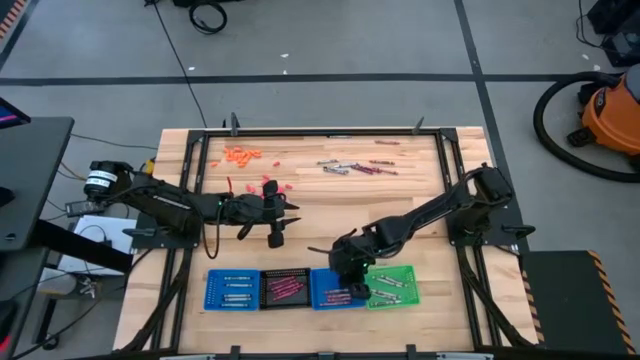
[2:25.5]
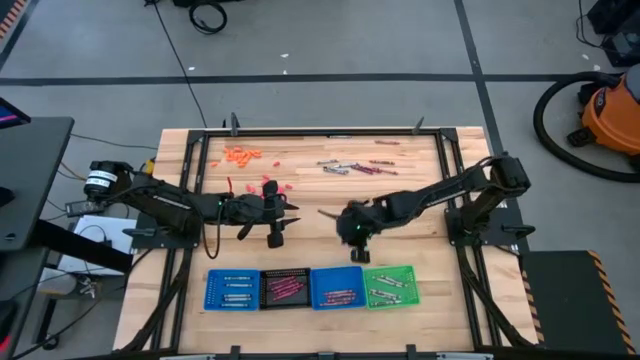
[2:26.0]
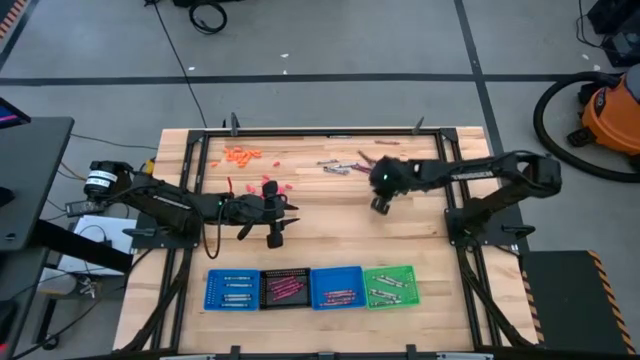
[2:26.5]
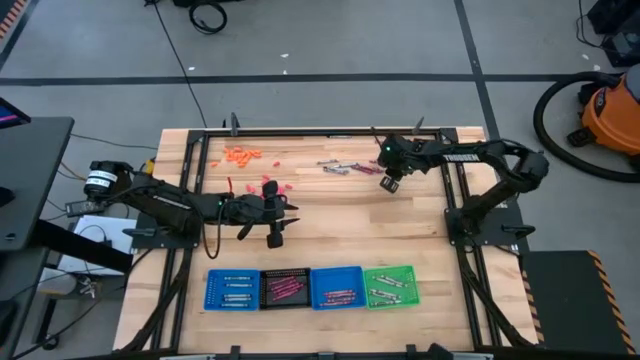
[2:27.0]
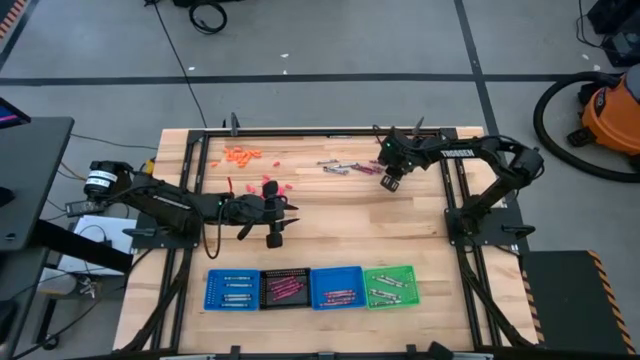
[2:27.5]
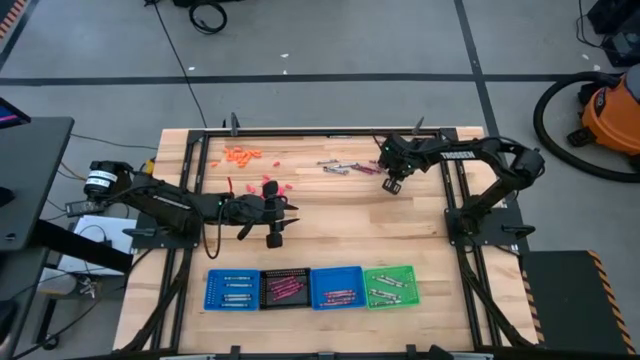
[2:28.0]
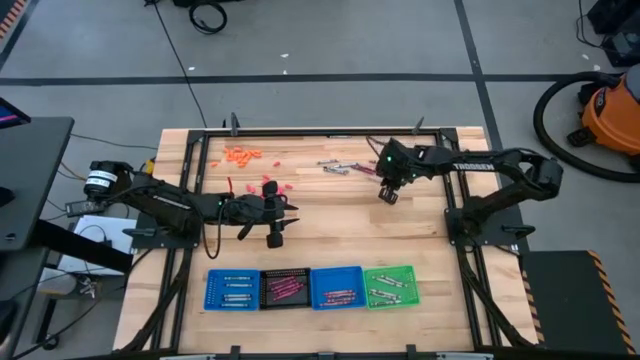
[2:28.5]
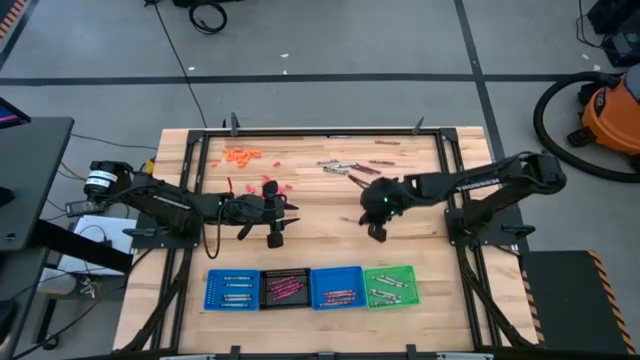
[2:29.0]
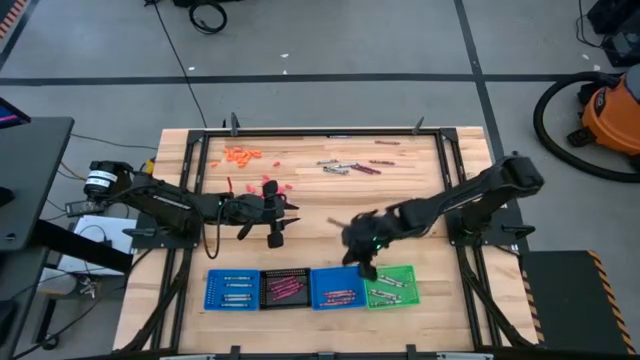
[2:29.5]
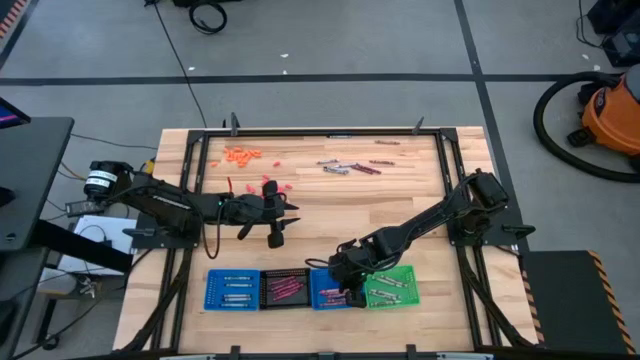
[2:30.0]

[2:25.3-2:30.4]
Task: Sort crayons
Put the pink crayon into the right blue bin

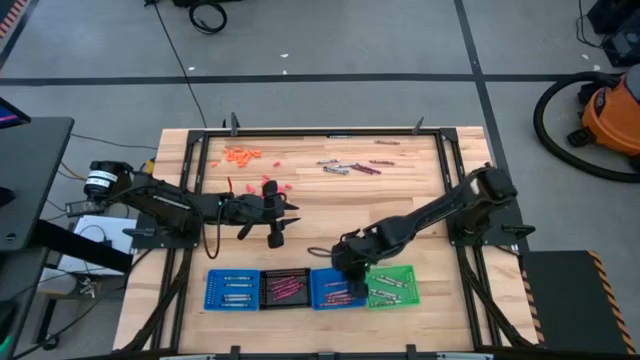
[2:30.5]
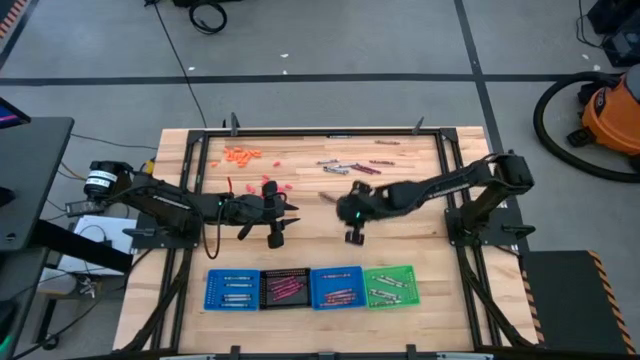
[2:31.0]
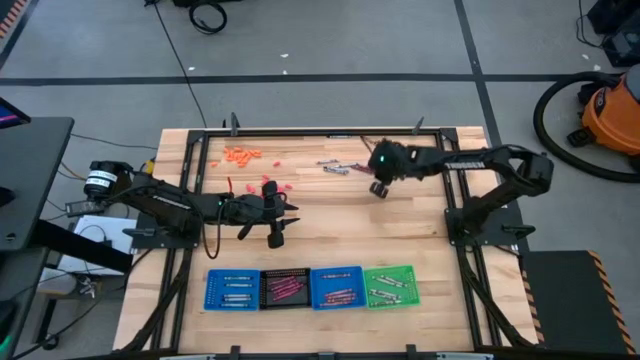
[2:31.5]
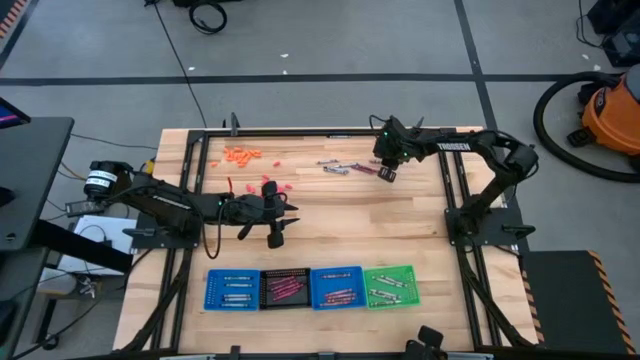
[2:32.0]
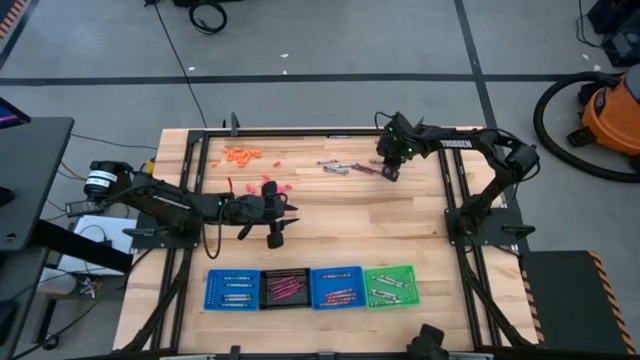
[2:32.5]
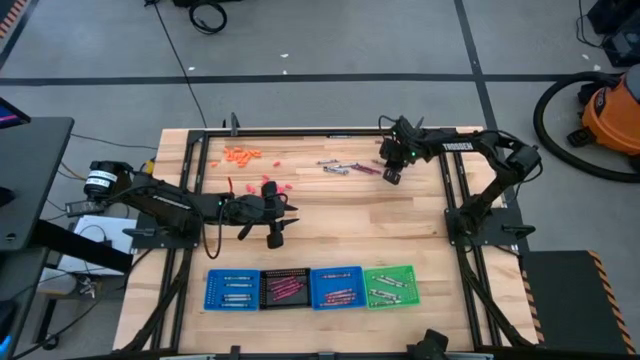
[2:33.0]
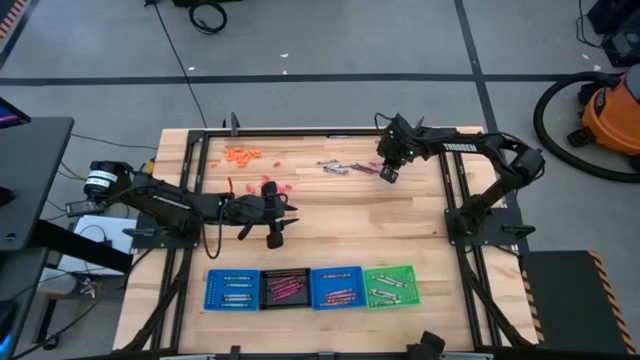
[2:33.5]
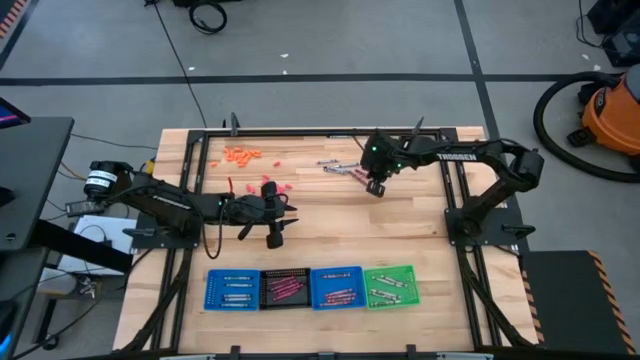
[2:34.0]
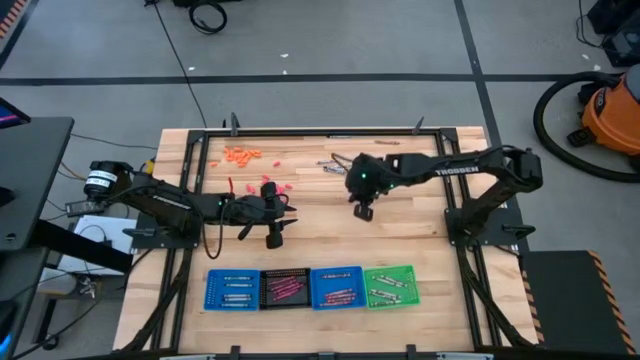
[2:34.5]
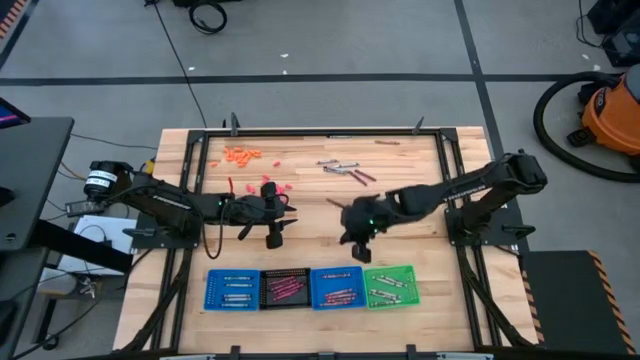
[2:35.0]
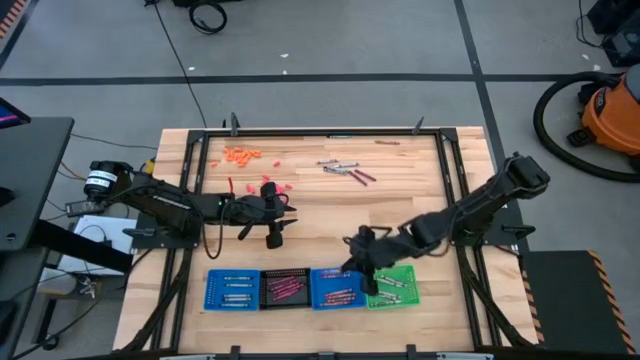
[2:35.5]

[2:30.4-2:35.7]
Put the pink crayon into the right blue bin

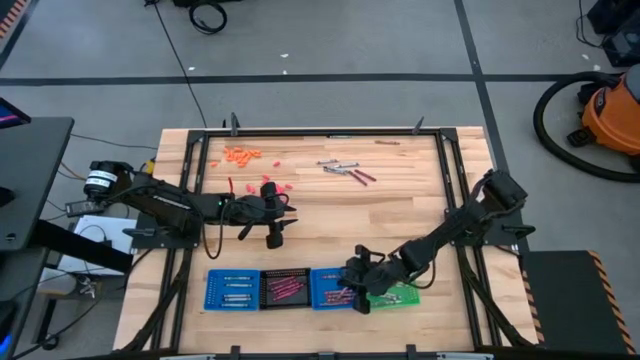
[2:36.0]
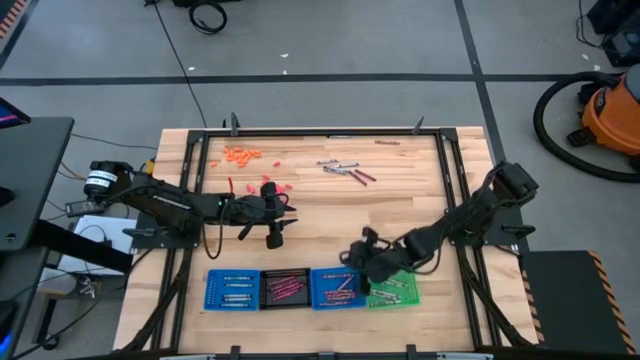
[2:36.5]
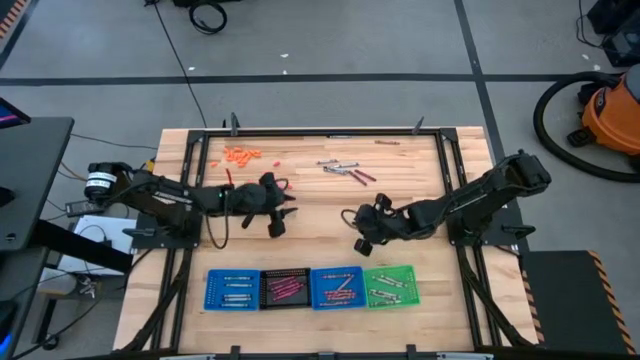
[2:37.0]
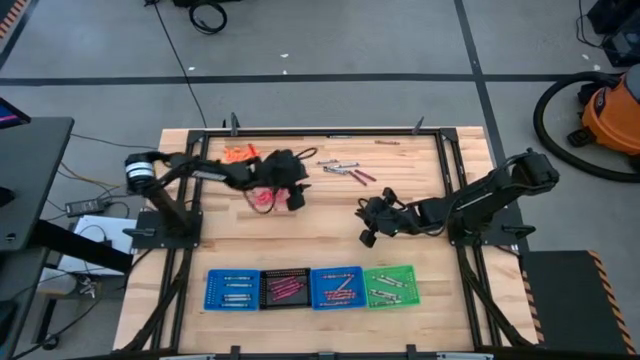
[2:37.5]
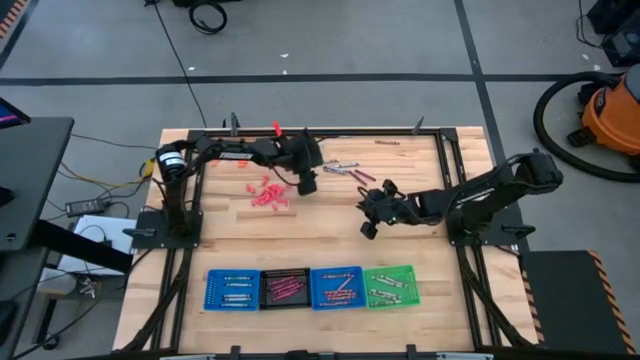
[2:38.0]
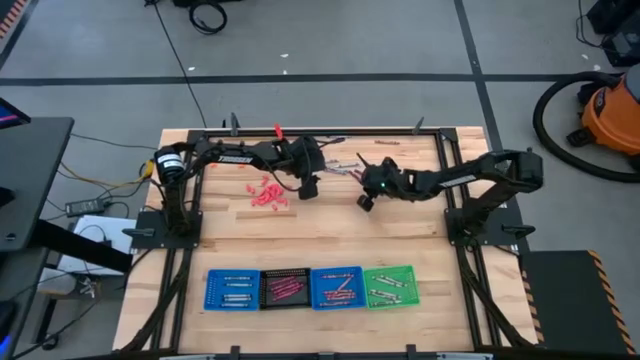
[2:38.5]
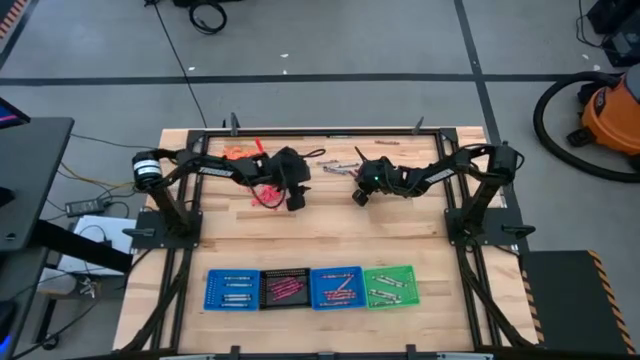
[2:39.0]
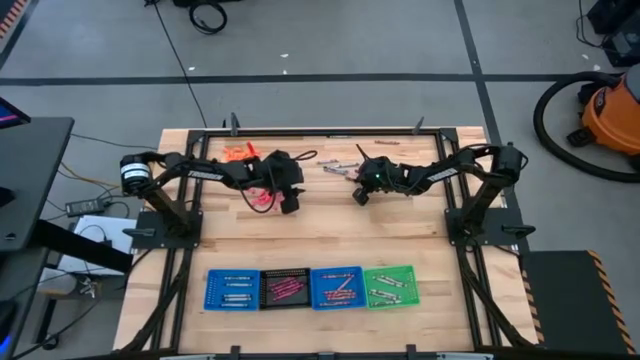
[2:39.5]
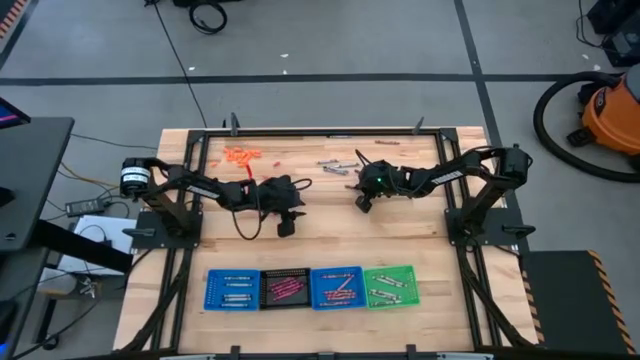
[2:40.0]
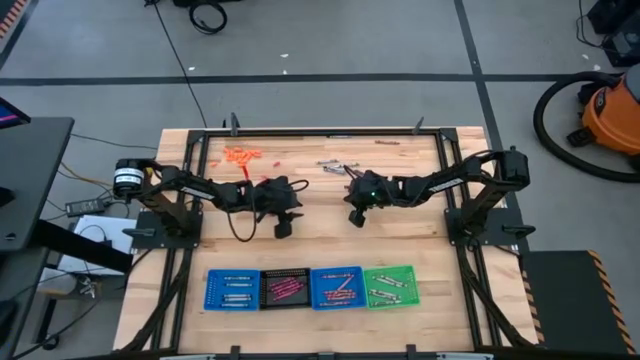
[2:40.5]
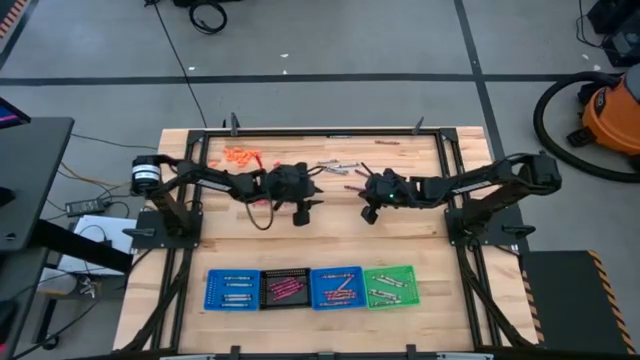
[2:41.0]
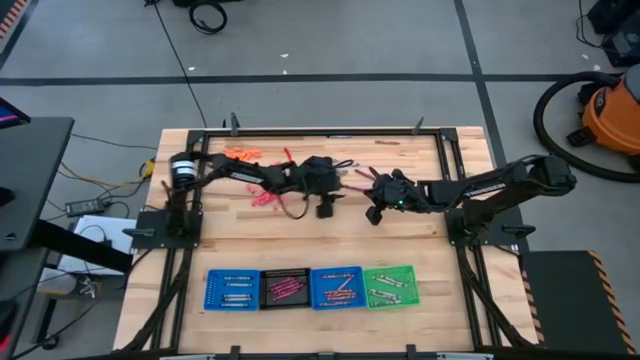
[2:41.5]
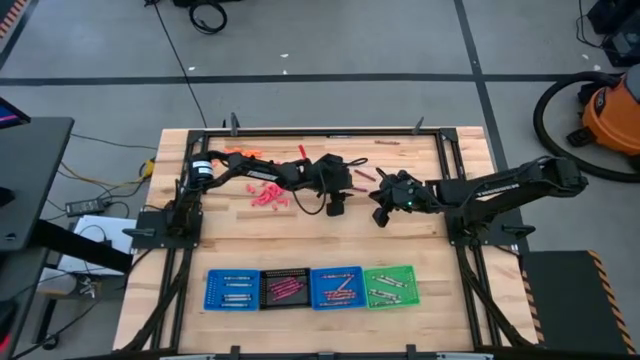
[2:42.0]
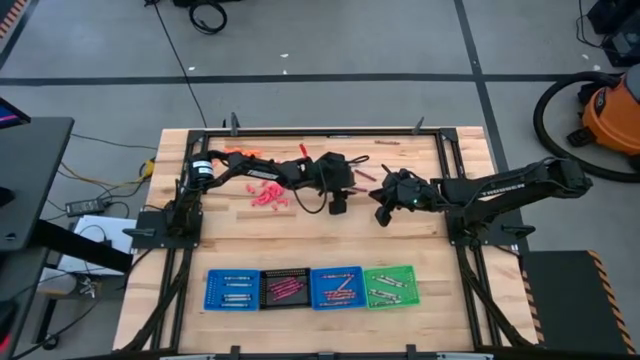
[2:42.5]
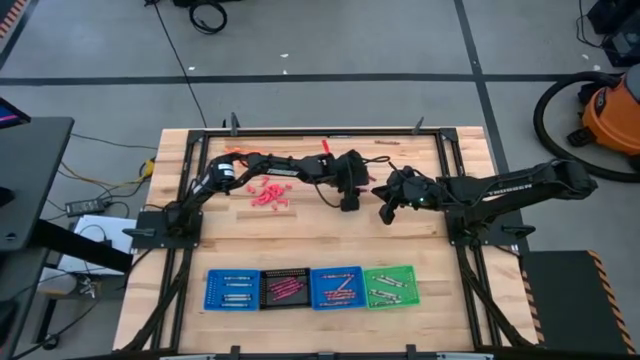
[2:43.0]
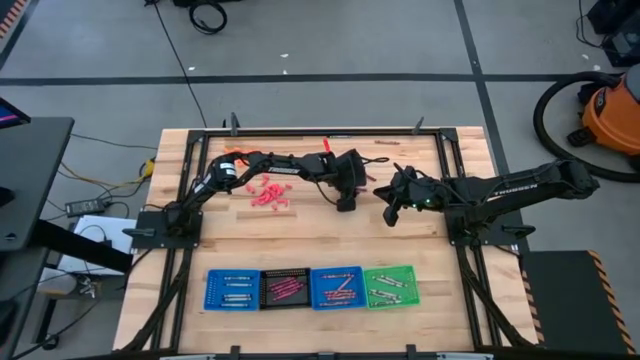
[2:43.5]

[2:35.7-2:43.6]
Put the dark pink crayon into the black bin

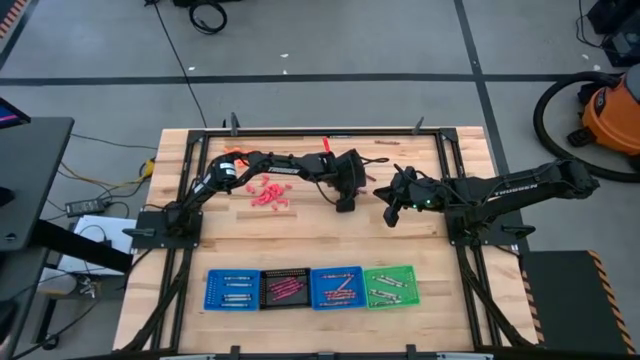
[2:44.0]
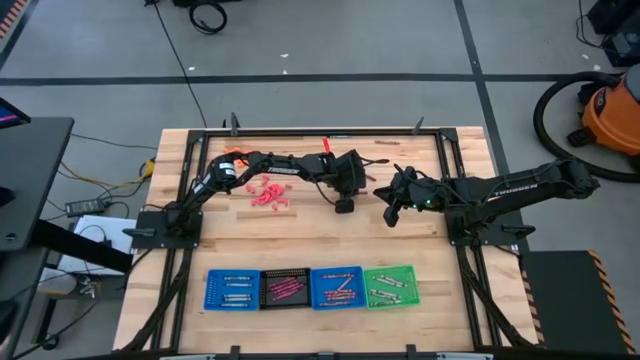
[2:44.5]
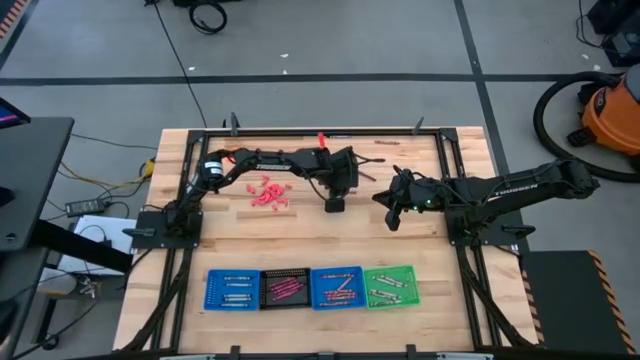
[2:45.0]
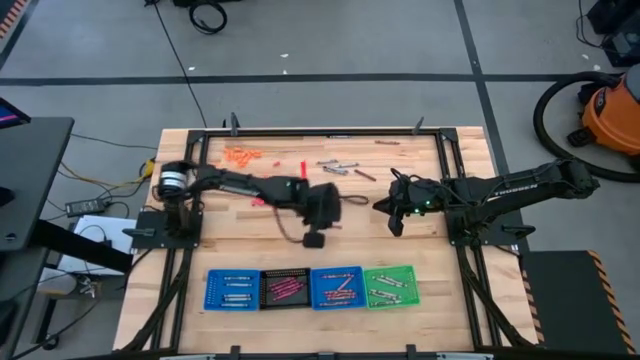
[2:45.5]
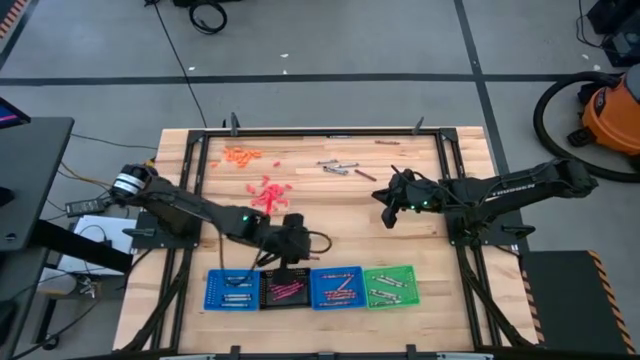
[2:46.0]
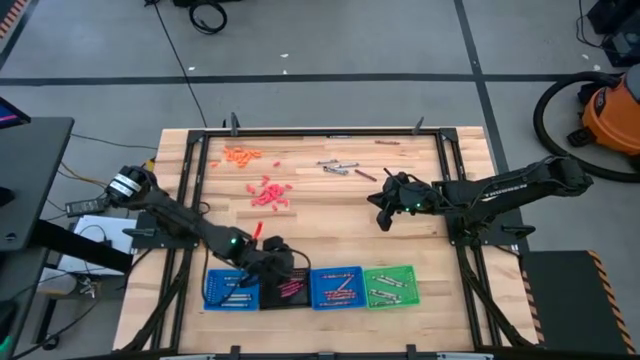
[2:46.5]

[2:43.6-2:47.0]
Put the dark pink crayon into the black bin
